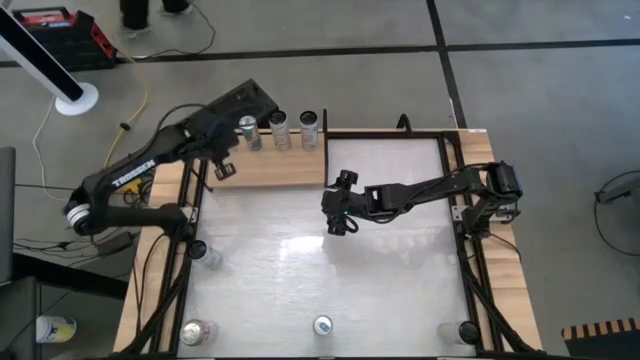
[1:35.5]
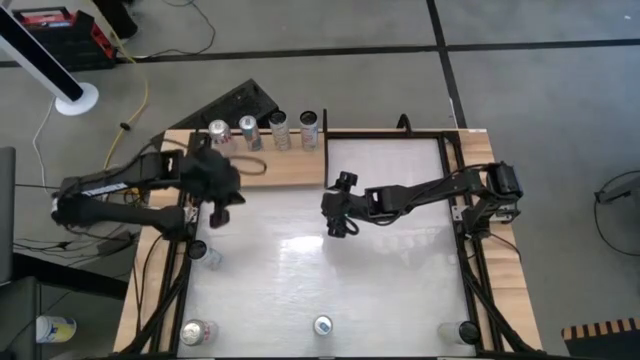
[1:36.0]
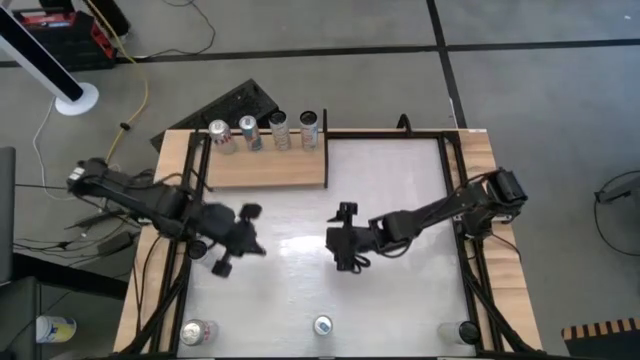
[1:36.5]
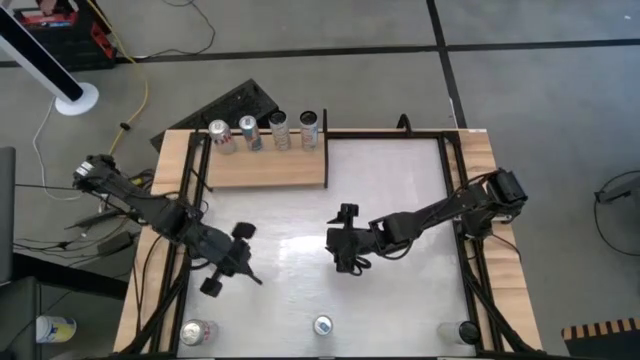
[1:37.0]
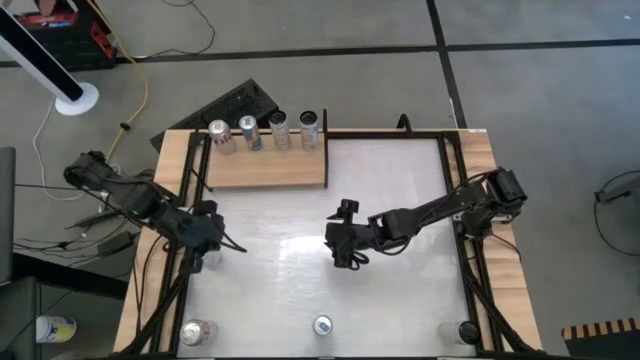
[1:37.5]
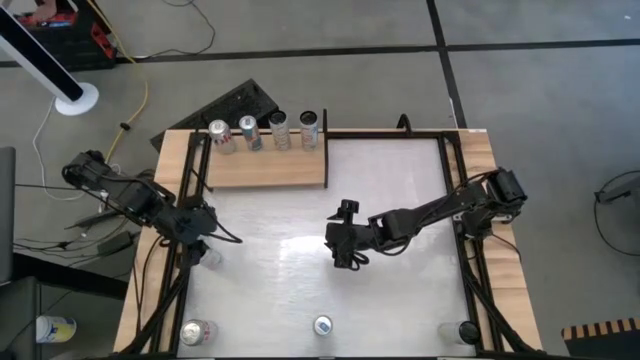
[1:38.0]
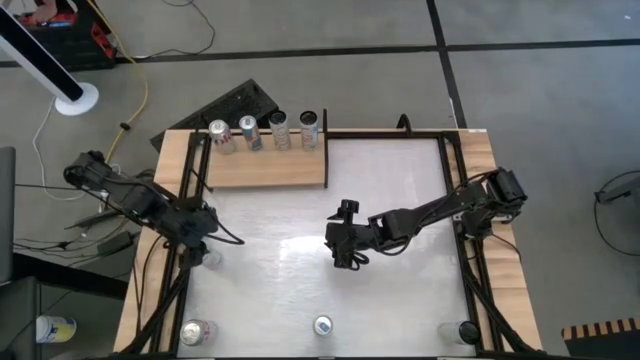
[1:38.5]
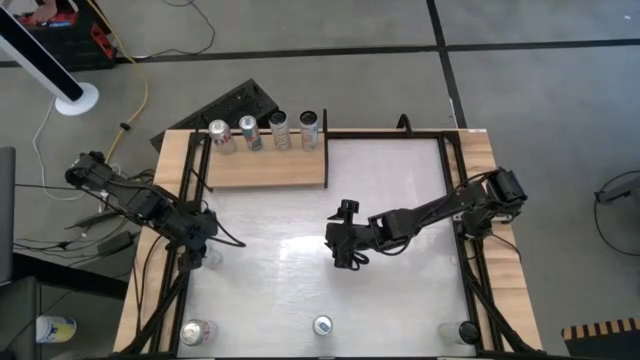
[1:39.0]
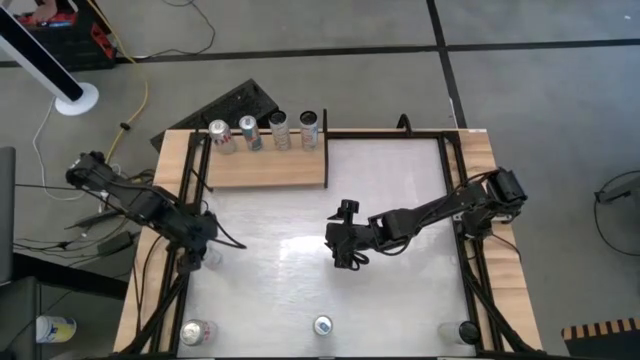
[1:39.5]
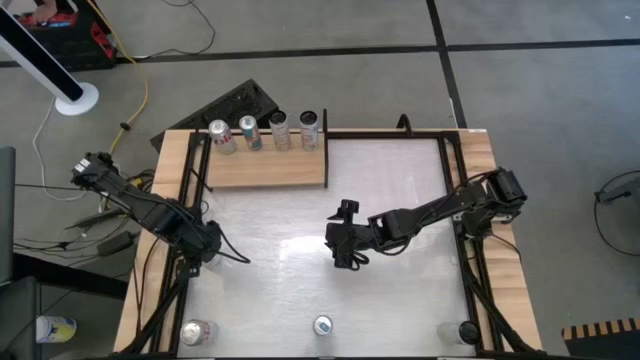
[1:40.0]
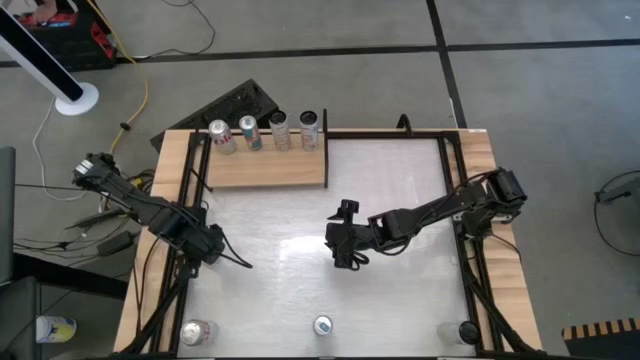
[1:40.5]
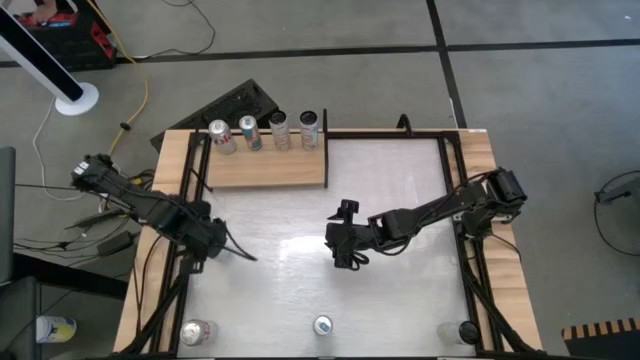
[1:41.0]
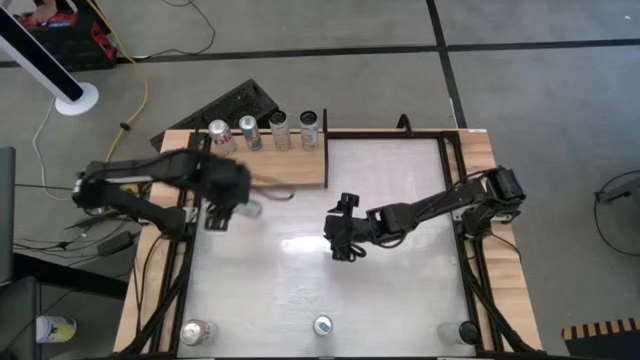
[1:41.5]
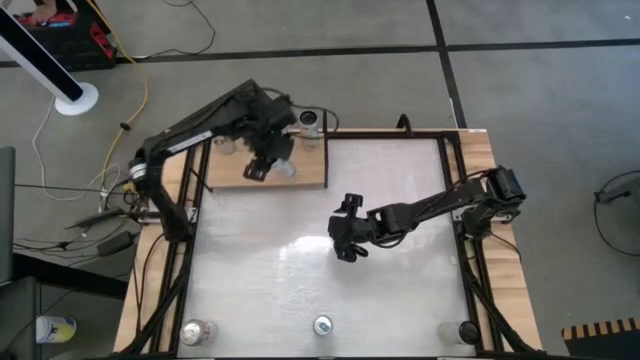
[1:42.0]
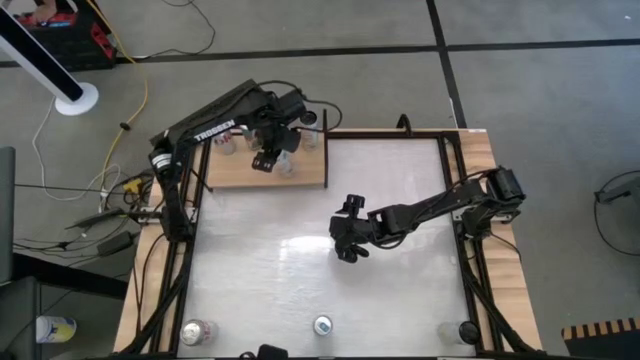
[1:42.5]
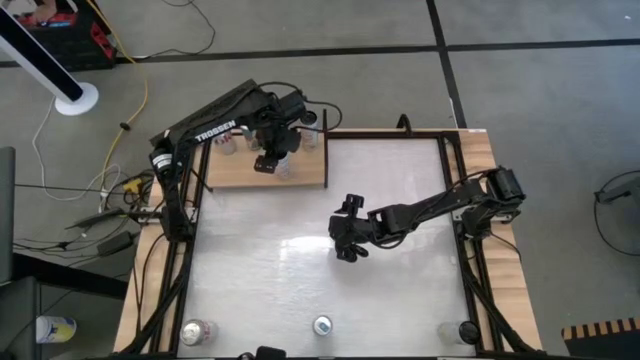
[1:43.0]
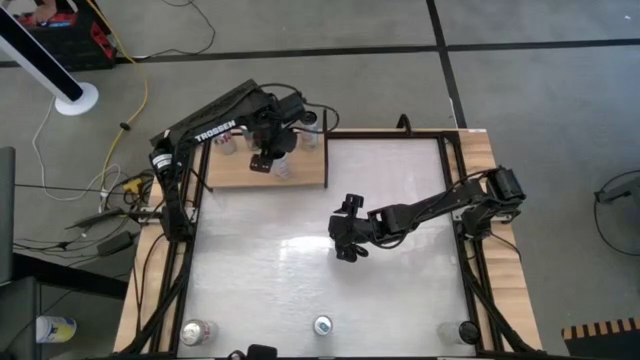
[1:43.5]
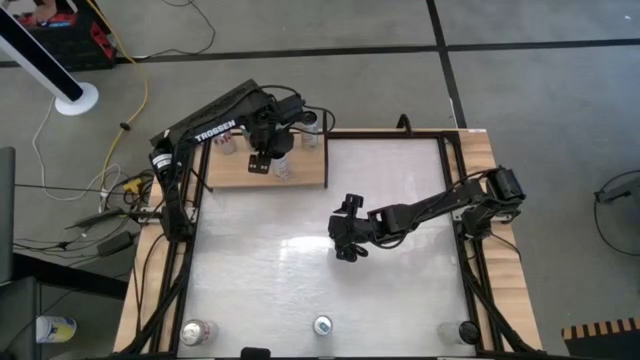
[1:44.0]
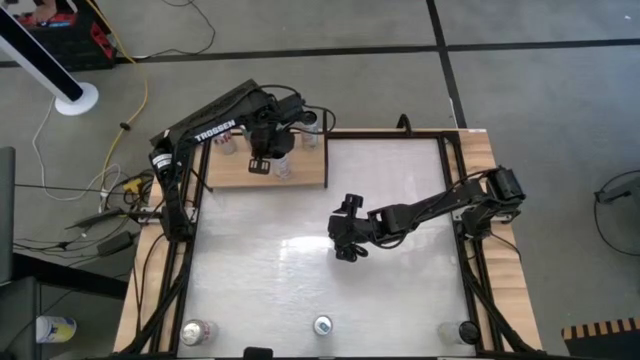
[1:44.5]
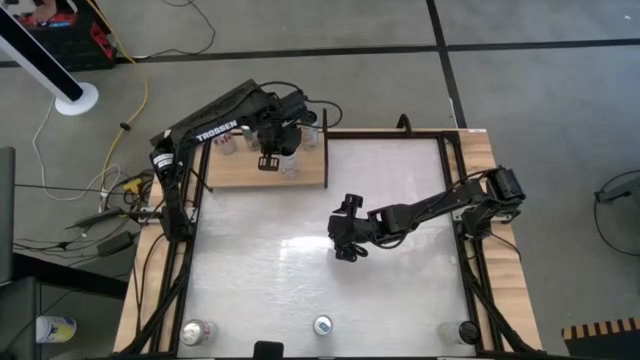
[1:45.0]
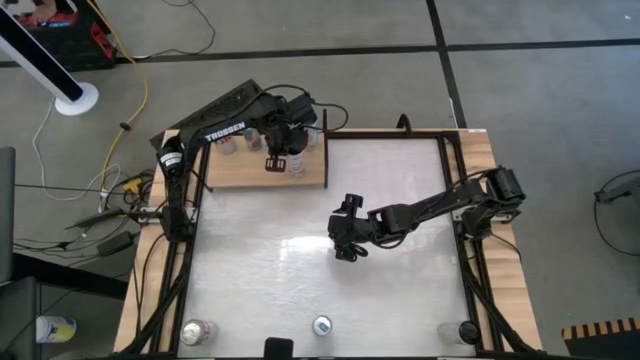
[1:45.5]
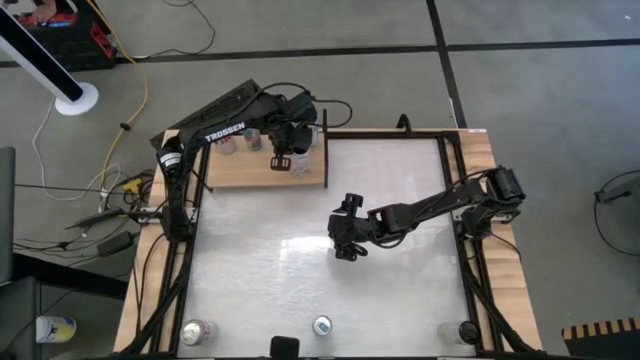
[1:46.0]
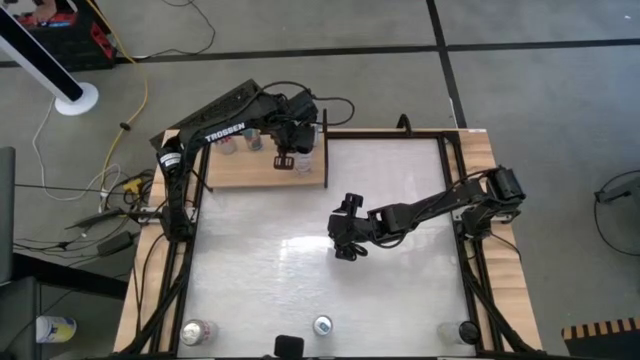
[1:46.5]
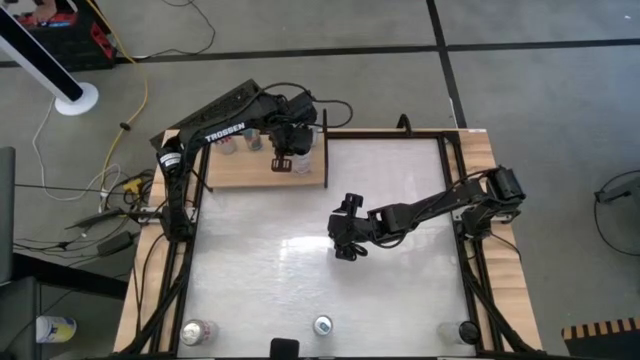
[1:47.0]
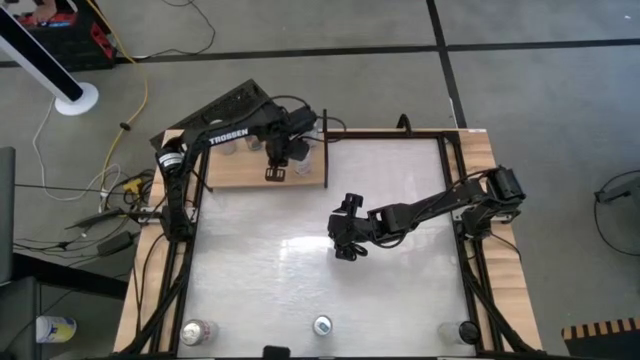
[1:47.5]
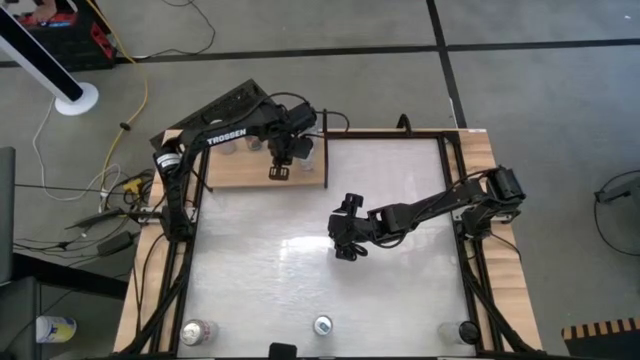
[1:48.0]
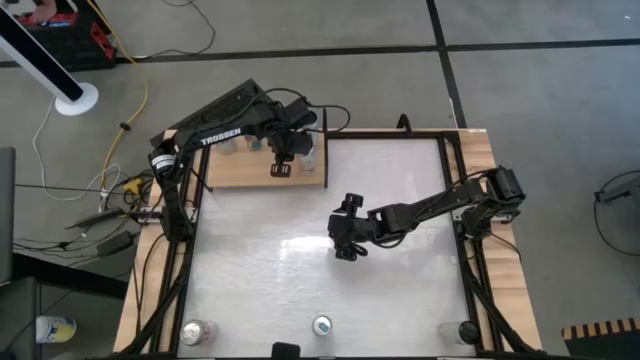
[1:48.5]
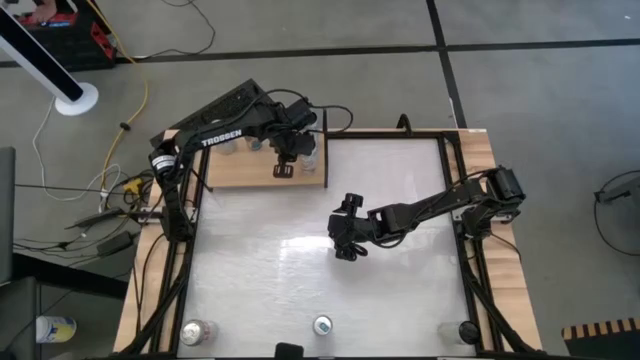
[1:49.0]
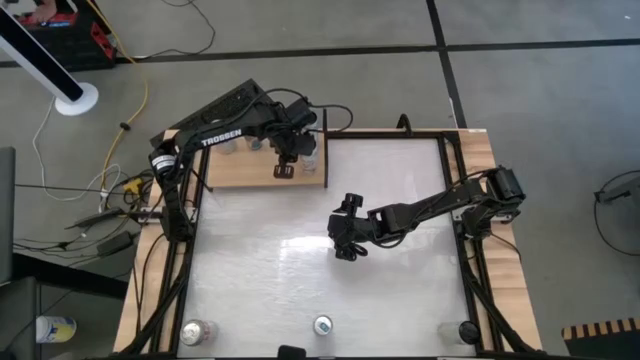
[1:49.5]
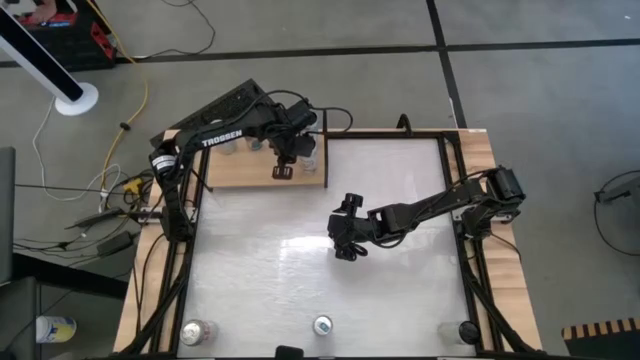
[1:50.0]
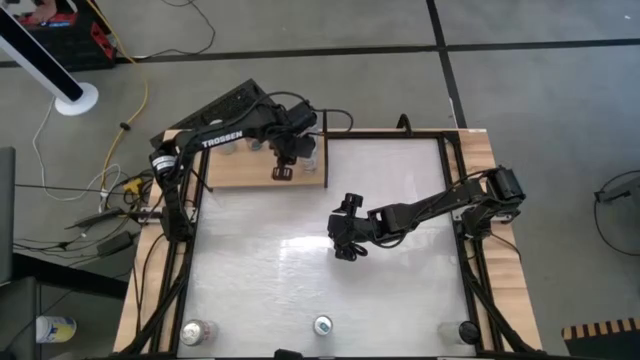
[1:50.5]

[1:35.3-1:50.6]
Task: Place canned beverage on shelf
Put the peach vibe celsius soda can aligned with the other peach vibe celsius soda can on the shelf

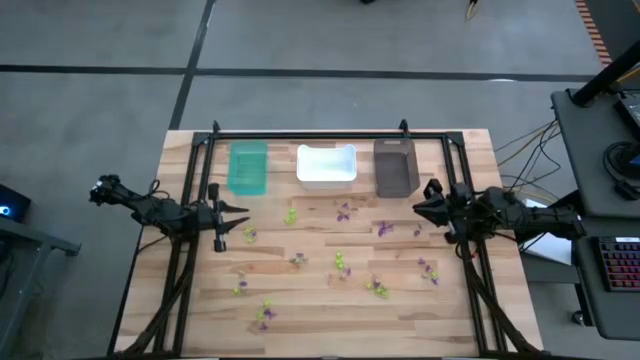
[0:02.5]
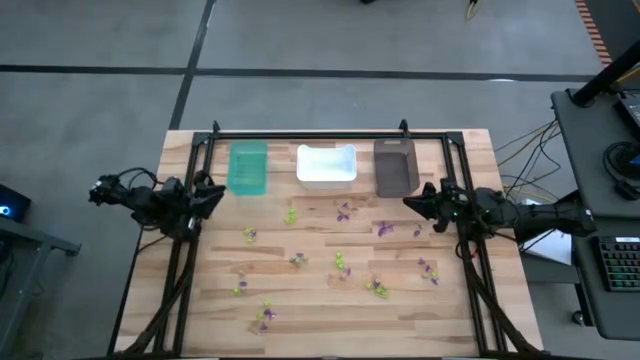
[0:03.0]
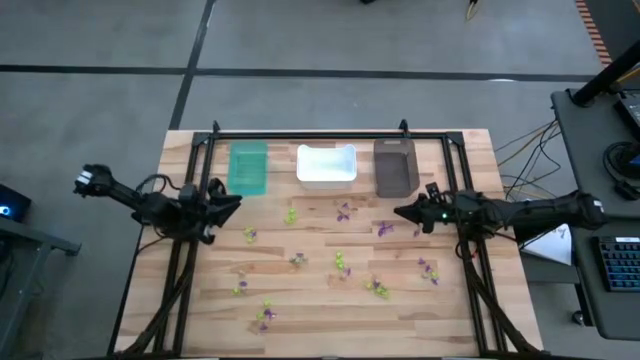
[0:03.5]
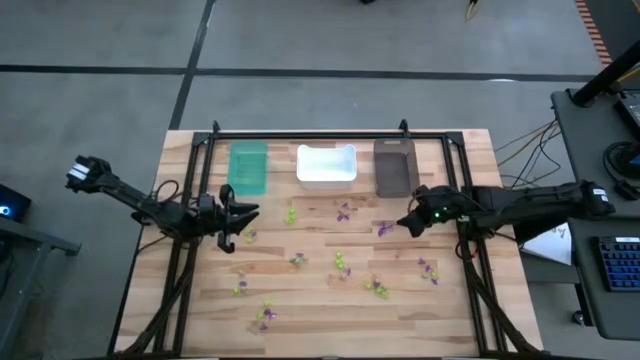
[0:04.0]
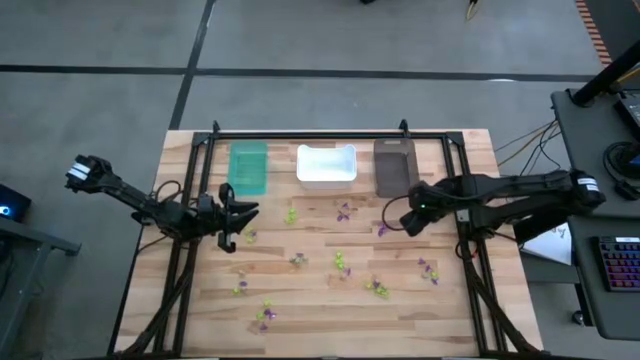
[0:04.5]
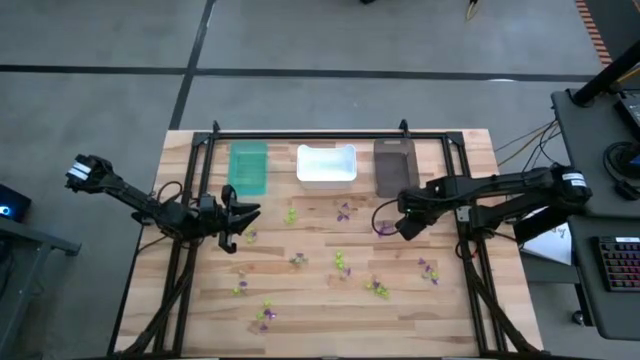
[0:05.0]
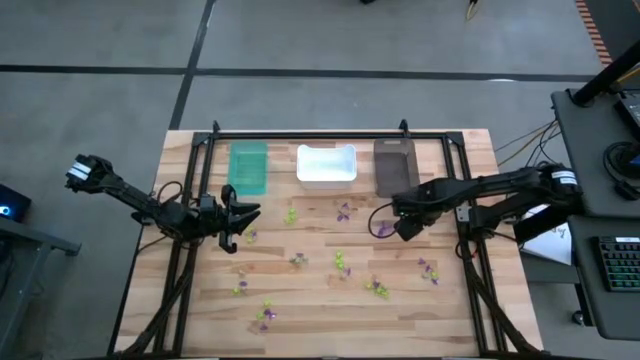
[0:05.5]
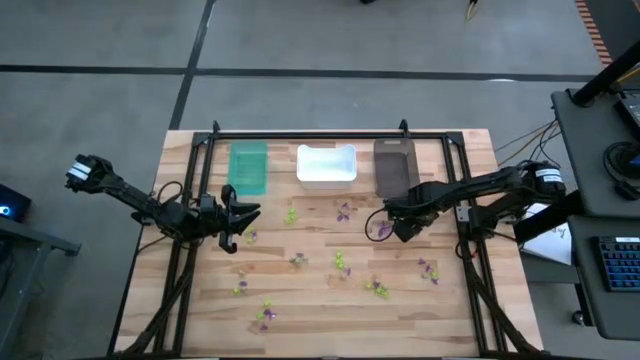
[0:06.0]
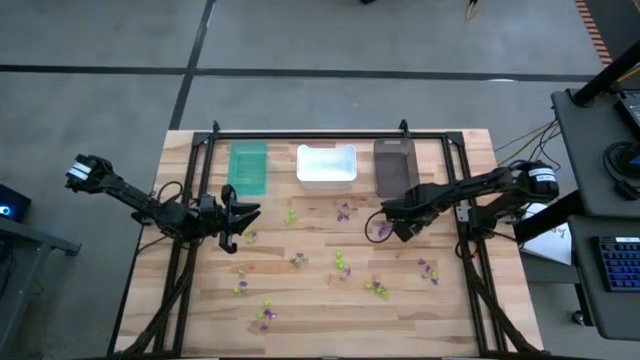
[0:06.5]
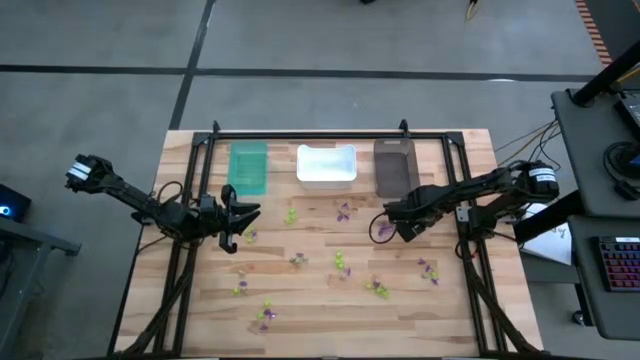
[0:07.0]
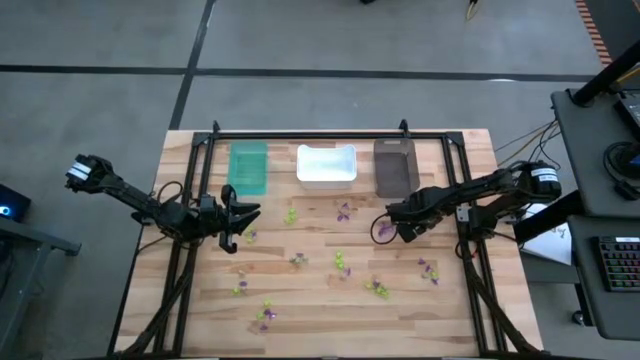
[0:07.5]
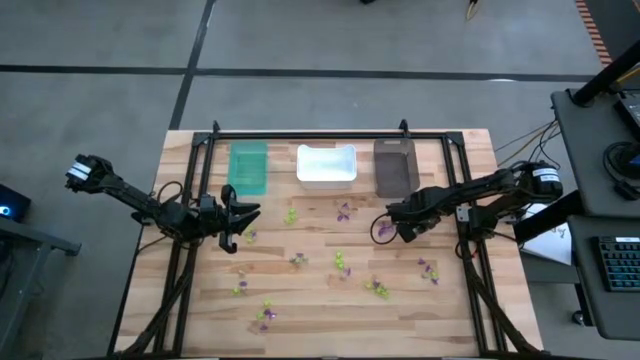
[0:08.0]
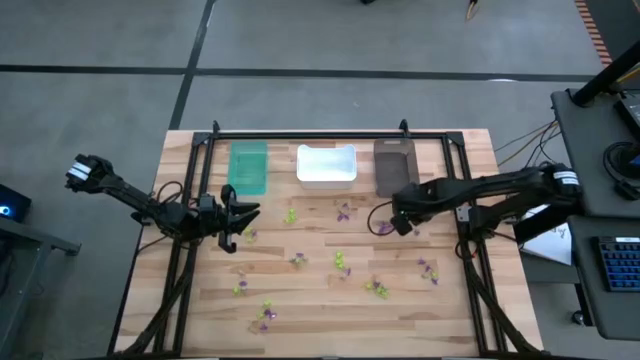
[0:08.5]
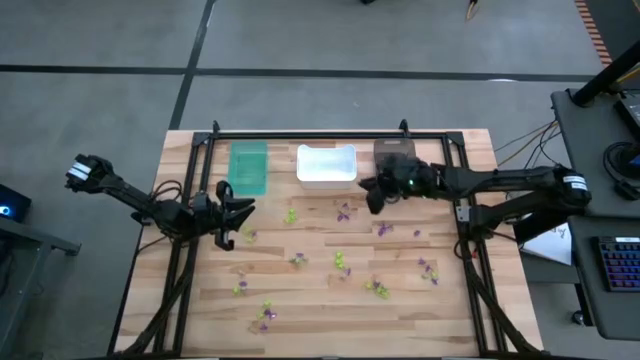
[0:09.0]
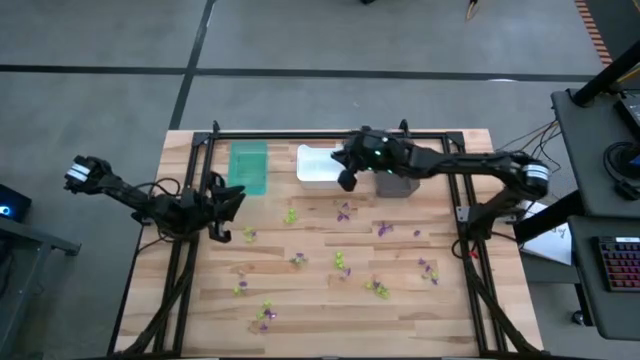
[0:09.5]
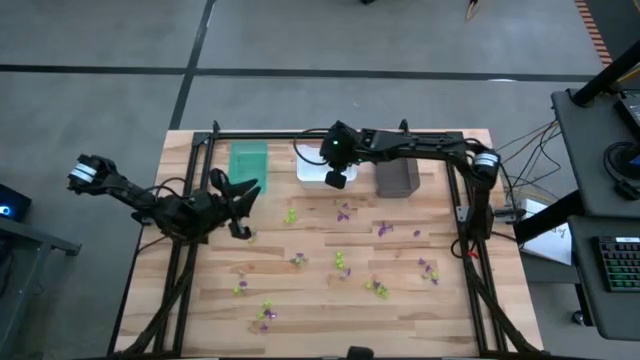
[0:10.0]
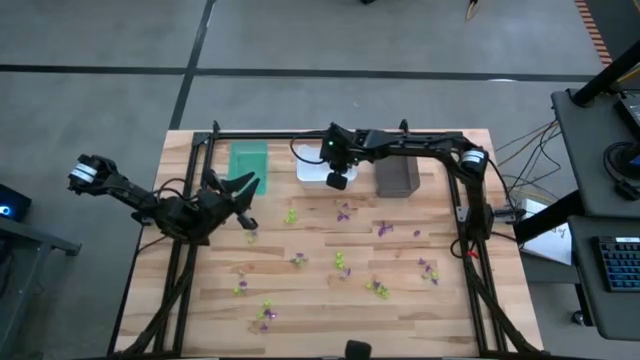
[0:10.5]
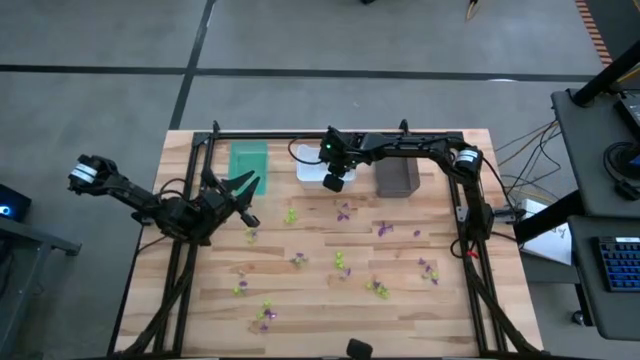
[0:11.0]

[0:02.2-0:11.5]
Task: Sort Halloween decoration
Put the white skull toy into the white bin
